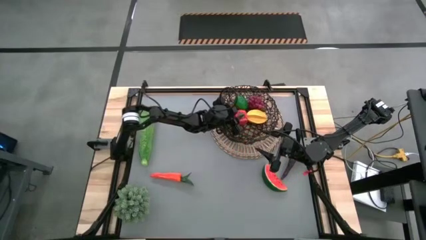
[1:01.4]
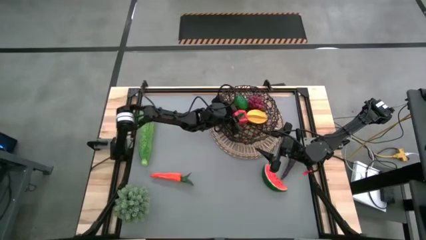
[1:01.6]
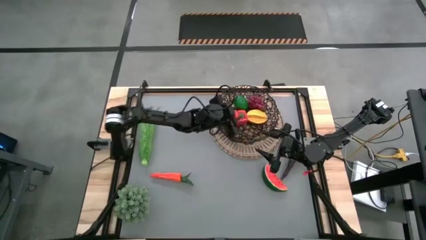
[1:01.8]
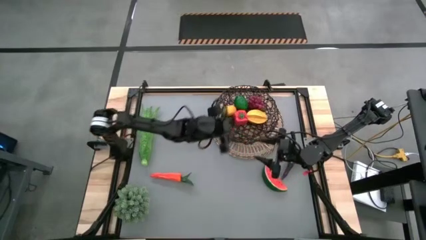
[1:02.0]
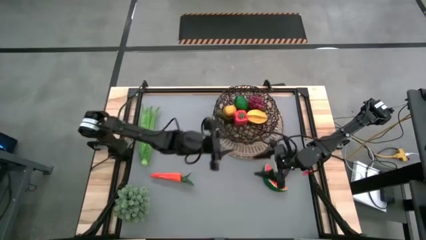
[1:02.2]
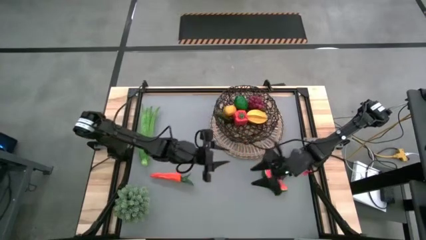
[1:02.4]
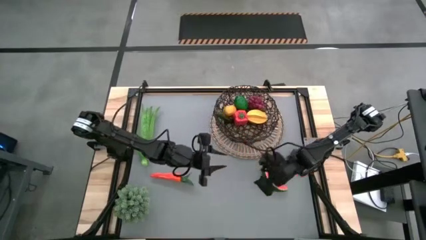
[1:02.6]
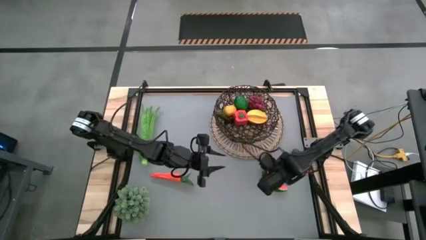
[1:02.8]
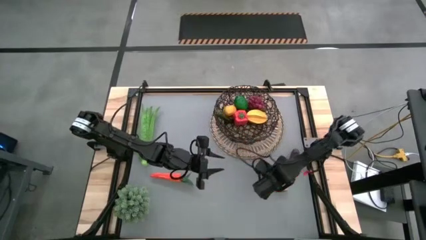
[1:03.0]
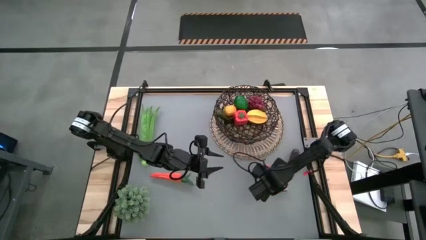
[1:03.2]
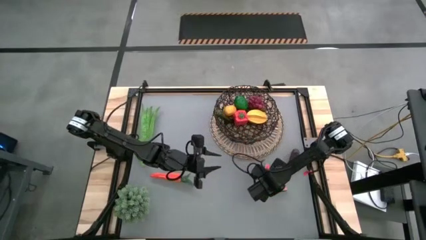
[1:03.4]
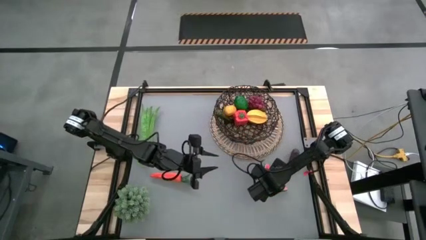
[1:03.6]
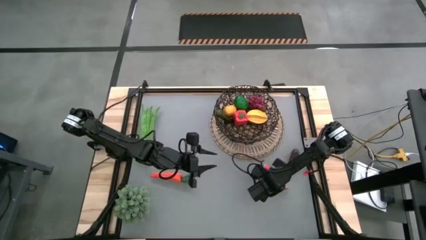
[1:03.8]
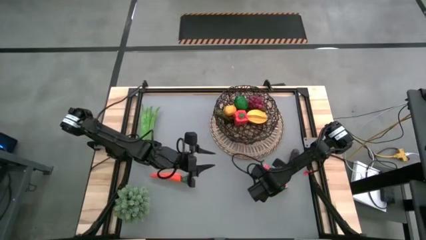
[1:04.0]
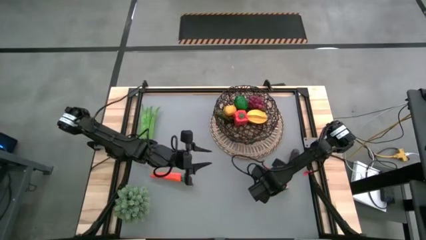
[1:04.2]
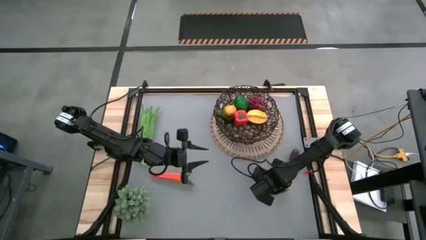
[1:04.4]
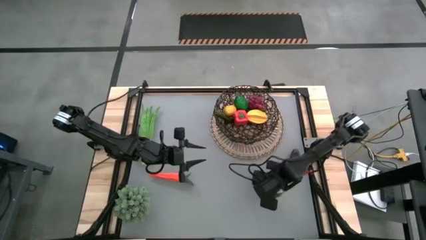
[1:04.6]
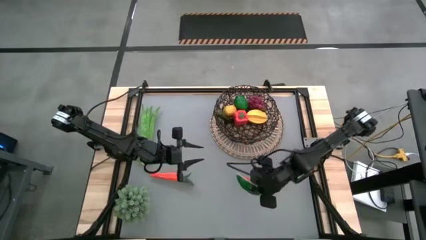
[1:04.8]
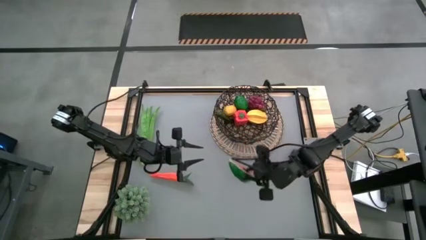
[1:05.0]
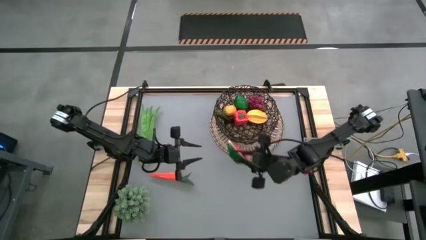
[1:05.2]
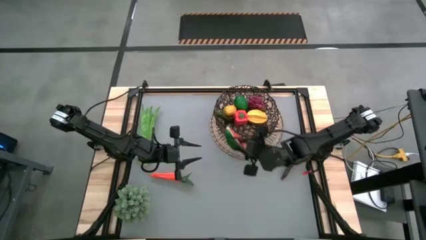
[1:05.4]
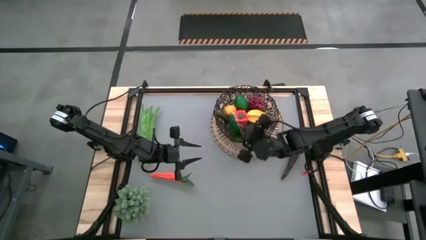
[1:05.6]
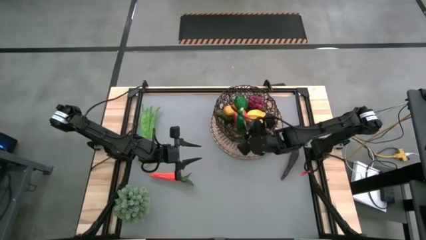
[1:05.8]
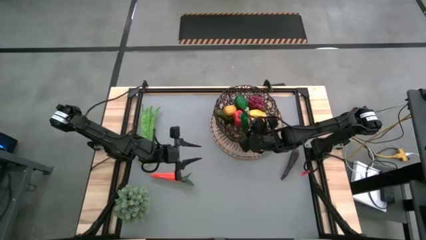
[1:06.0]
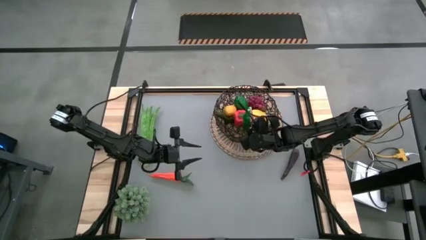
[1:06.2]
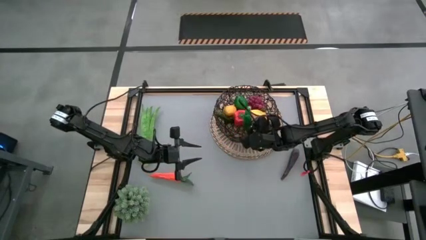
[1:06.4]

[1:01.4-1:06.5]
Task: Build produce basket
Put the green and red watermelon into the basket

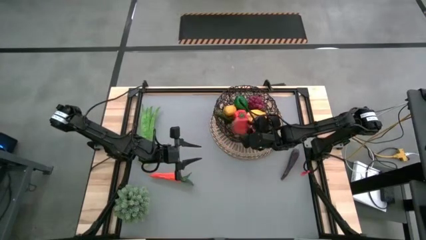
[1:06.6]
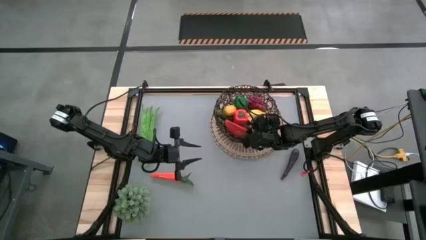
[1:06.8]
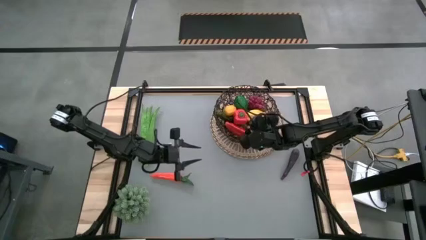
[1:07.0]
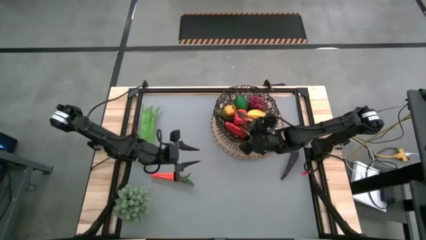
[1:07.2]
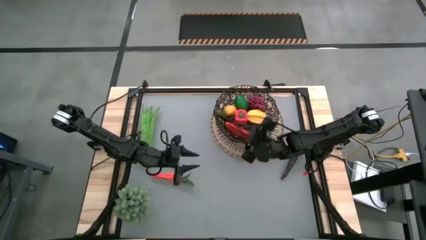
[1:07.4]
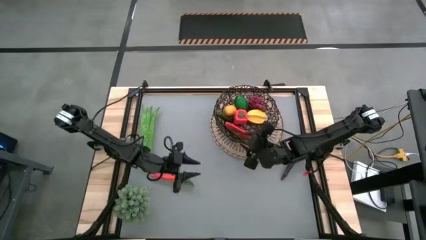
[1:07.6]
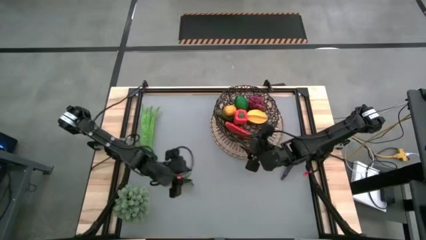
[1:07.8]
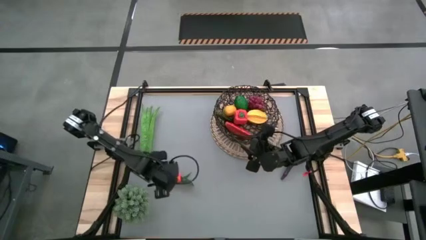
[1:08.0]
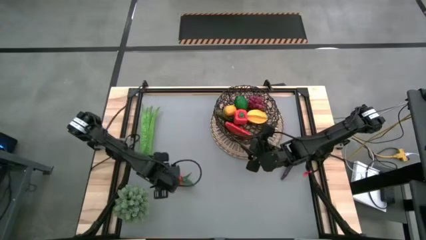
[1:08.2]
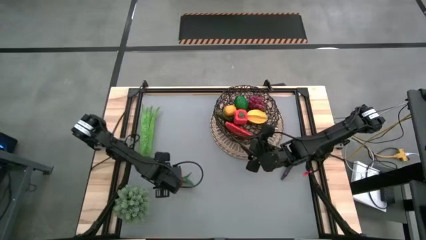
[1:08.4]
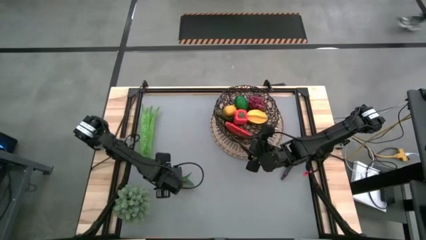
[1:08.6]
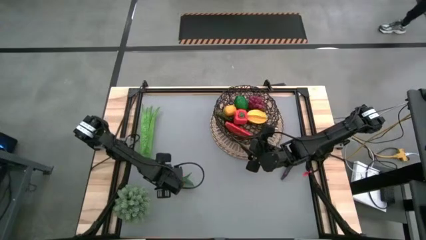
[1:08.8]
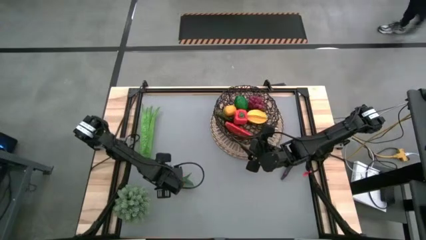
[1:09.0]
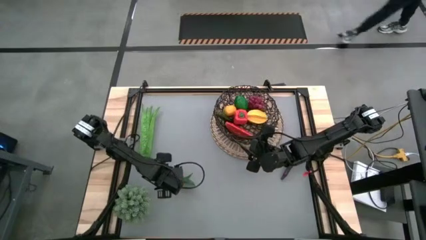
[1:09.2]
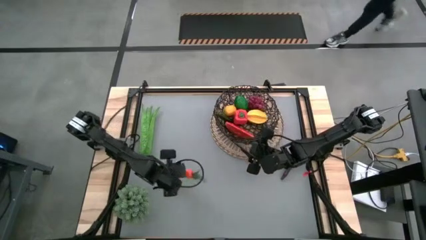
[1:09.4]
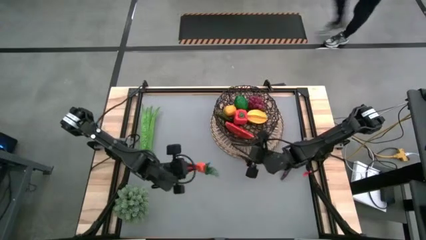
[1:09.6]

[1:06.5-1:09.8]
Put the orange carrot into the basket

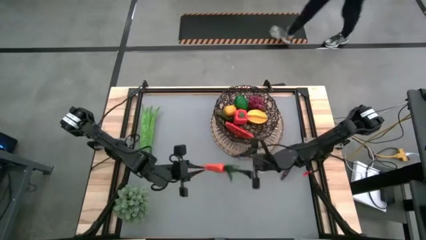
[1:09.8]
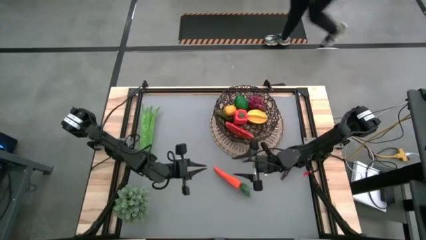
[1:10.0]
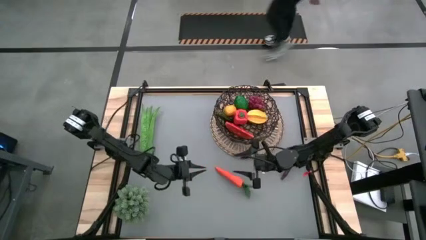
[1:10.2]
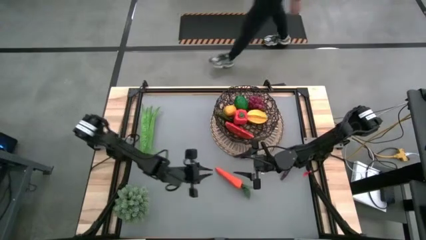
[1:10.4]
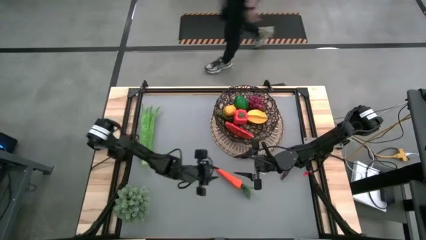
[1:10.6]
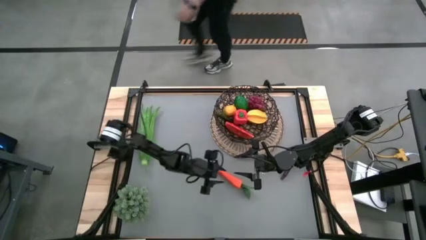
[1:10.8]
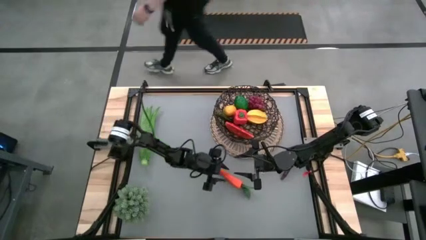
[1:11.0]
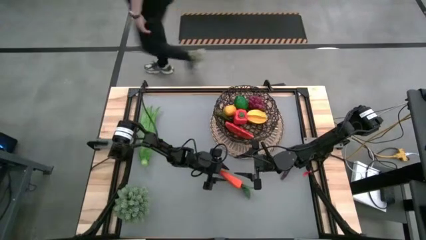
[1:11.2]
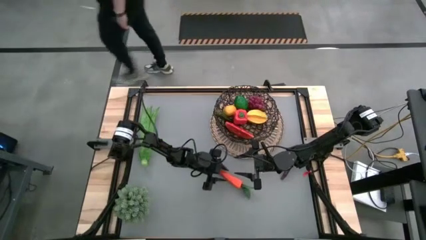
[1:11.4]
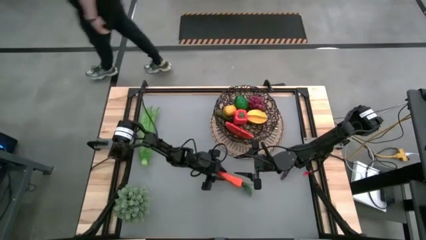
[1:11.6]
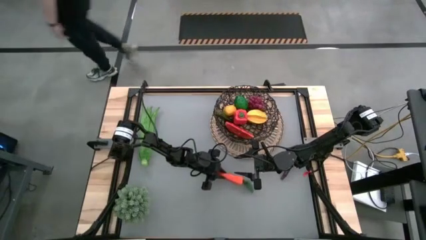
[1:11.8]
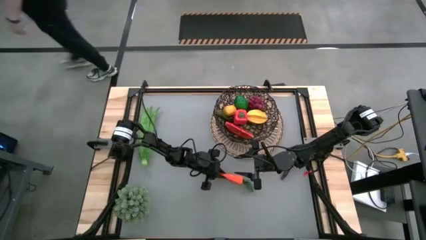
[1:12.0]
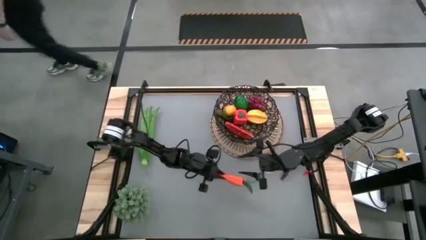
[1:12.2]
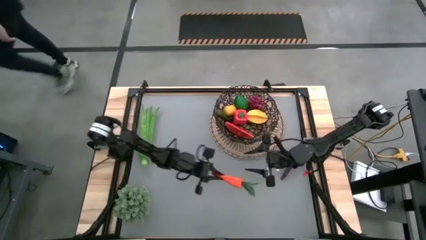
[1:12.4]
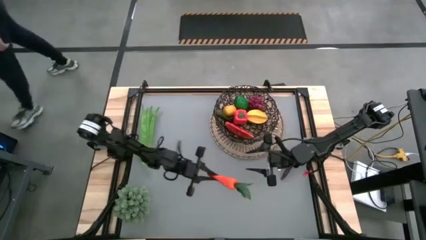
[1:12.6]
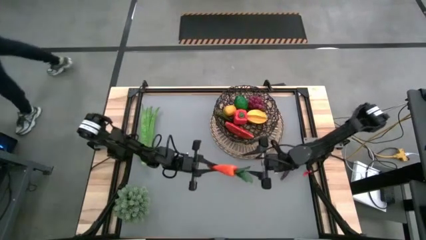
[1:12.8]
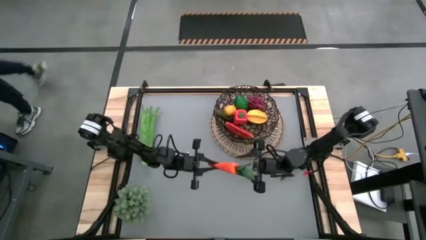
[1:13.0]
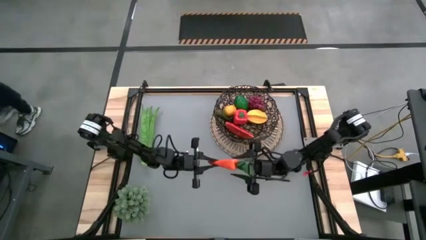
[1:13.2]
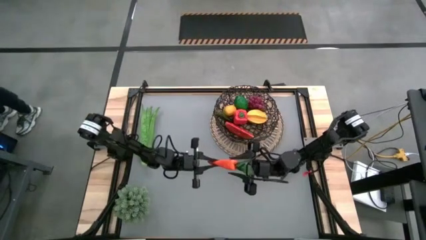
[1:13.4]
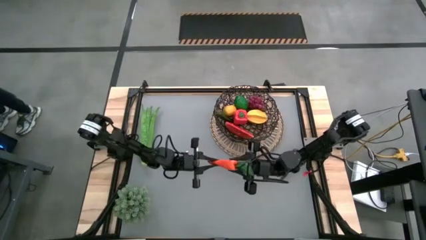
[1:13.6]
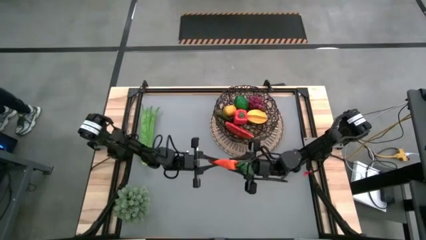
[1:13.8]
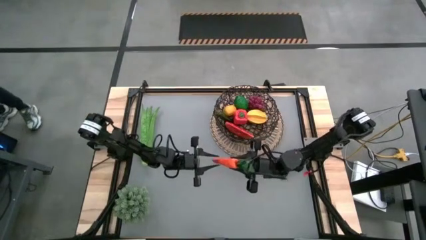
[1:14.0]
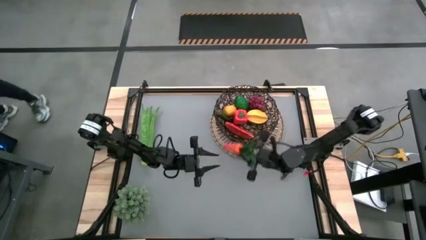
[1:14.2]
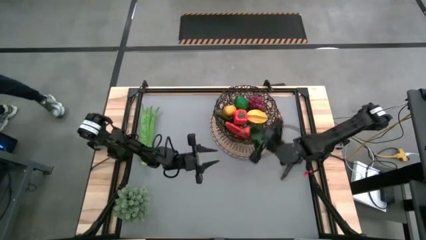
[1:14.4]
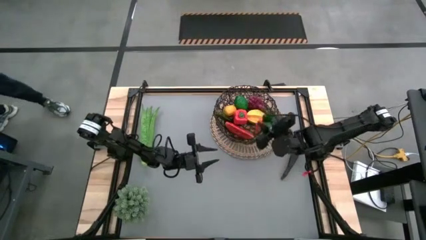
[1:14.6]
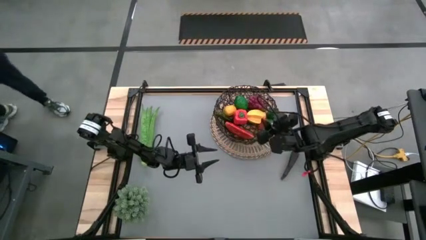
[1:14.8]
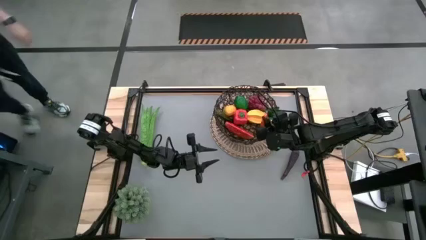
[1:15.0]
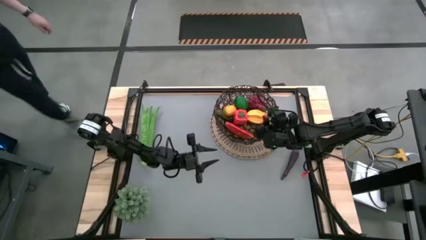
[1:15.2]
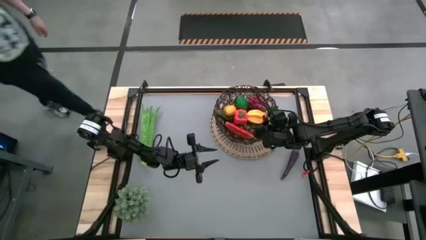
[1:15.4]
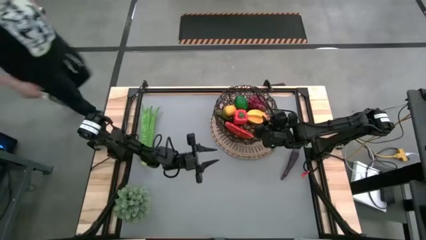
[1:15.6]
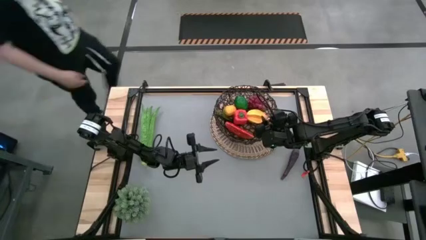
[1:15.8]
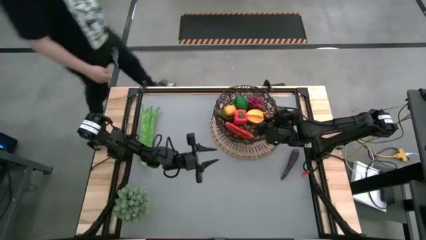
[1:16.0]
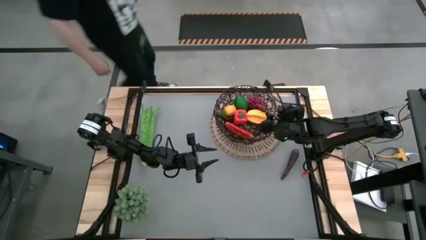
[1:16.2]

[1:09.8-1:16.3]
Put the orange carrot into the basket
